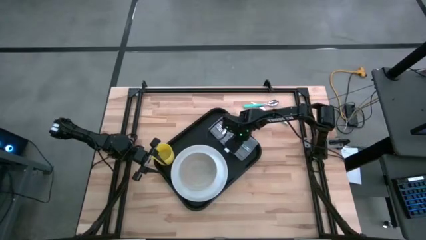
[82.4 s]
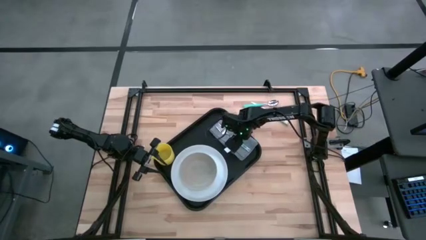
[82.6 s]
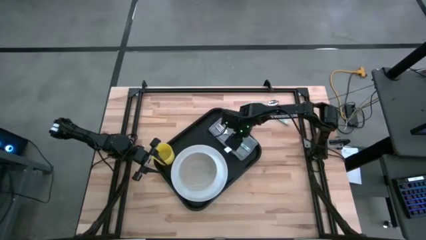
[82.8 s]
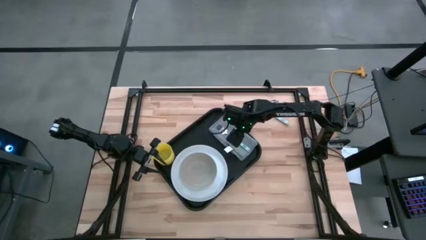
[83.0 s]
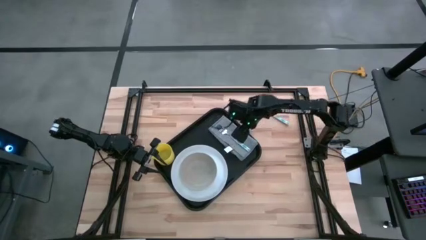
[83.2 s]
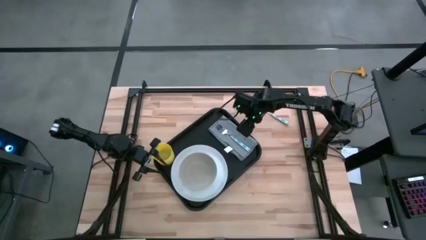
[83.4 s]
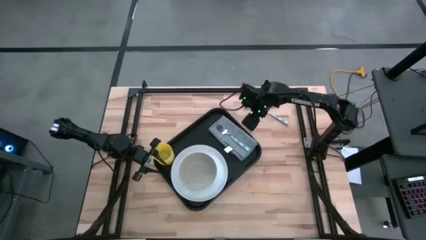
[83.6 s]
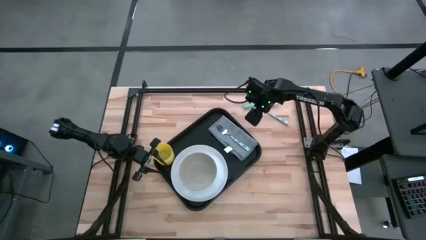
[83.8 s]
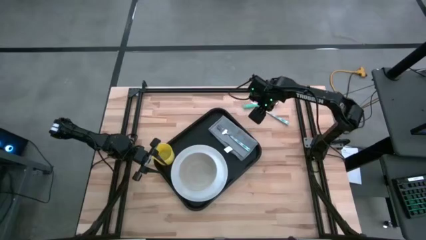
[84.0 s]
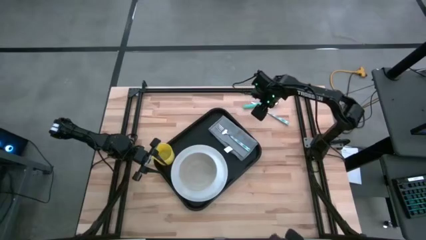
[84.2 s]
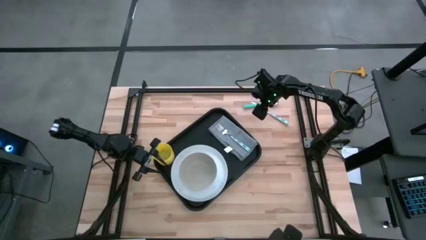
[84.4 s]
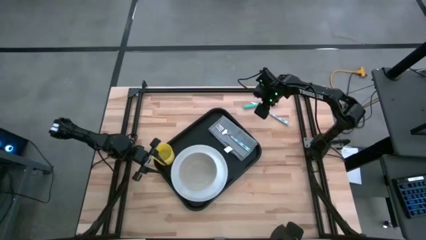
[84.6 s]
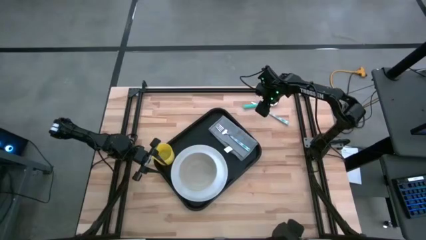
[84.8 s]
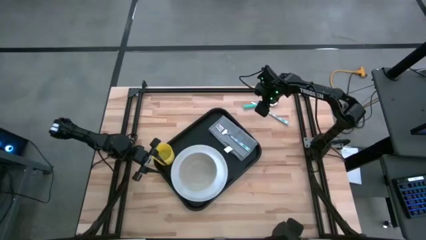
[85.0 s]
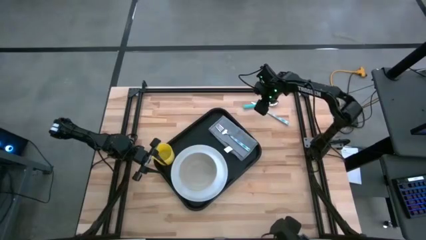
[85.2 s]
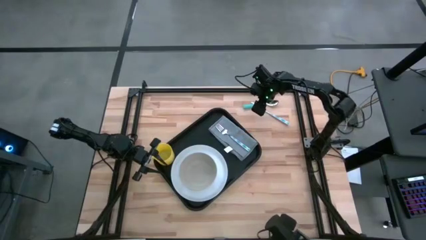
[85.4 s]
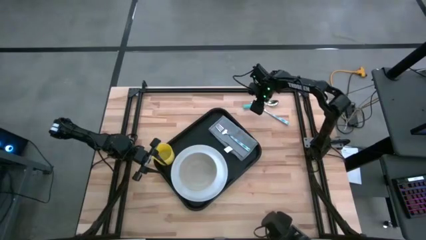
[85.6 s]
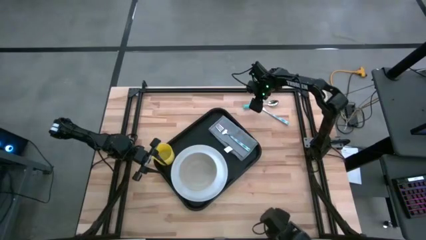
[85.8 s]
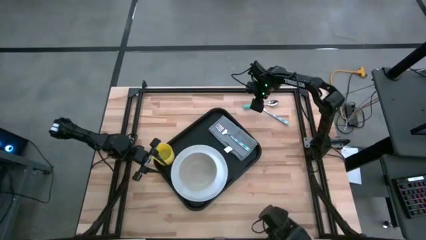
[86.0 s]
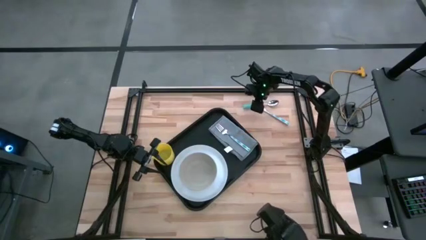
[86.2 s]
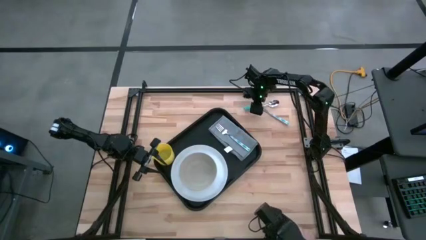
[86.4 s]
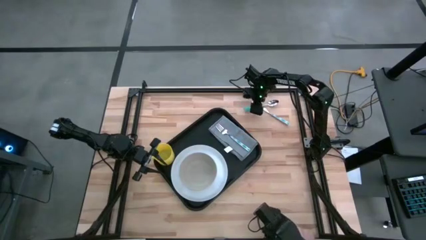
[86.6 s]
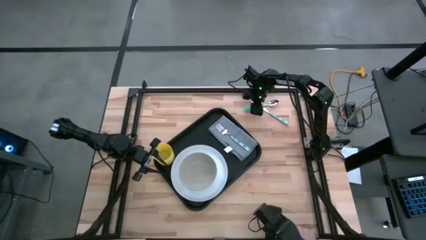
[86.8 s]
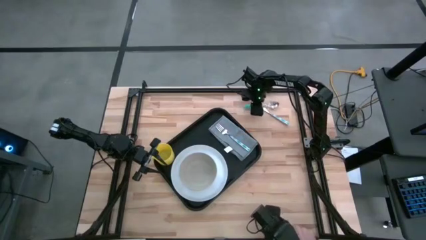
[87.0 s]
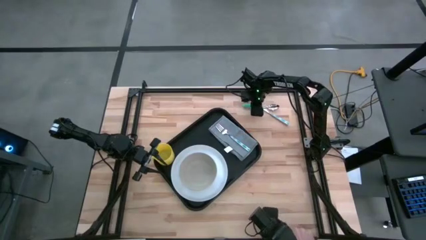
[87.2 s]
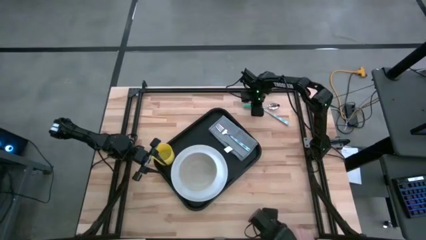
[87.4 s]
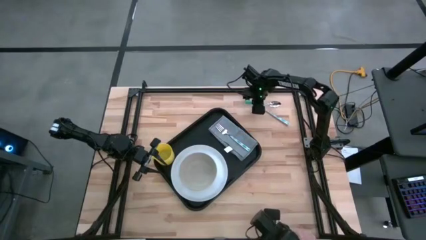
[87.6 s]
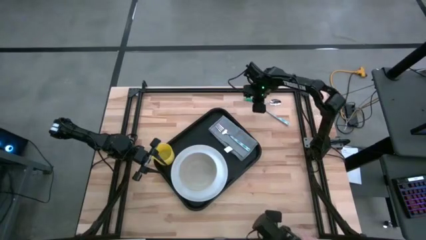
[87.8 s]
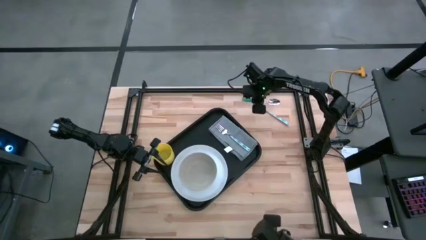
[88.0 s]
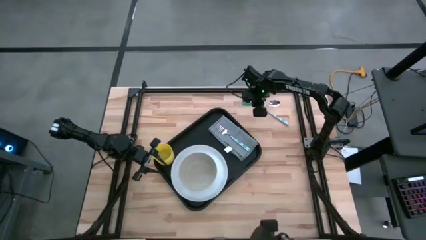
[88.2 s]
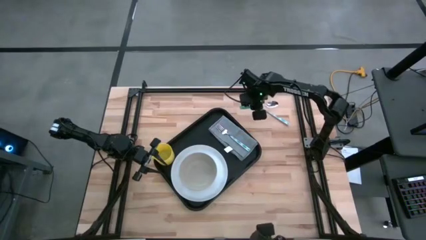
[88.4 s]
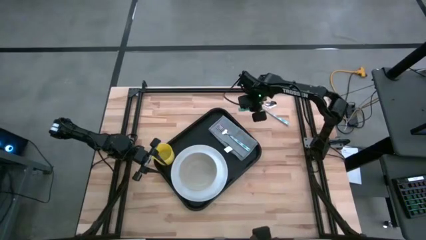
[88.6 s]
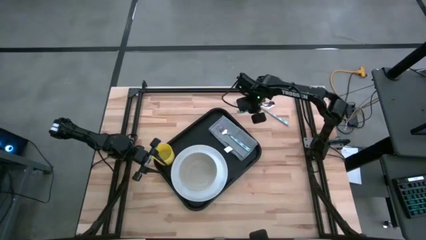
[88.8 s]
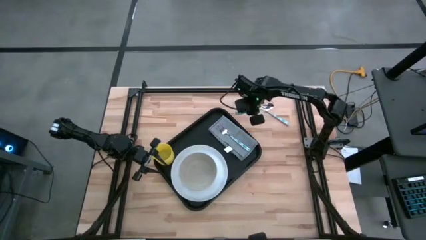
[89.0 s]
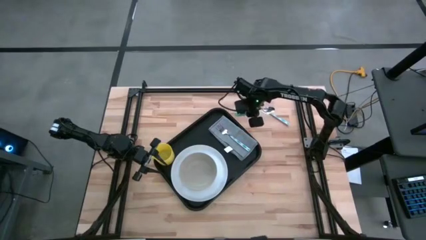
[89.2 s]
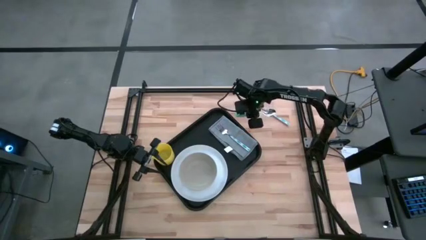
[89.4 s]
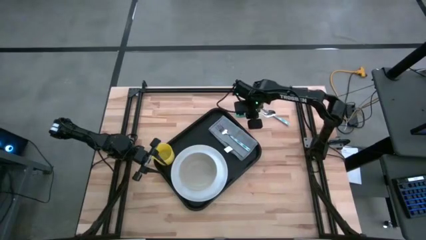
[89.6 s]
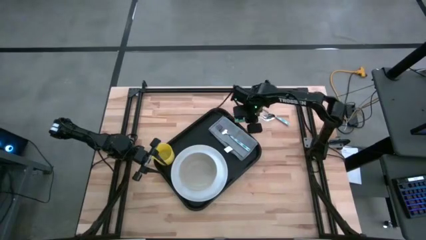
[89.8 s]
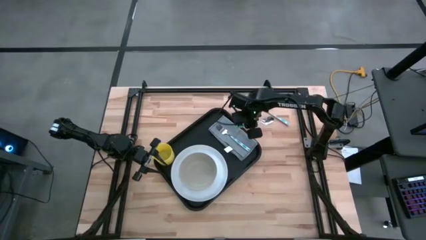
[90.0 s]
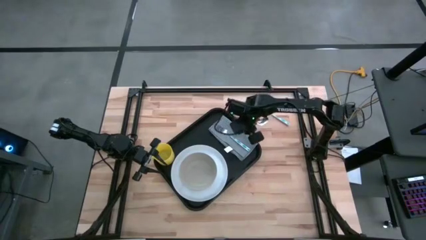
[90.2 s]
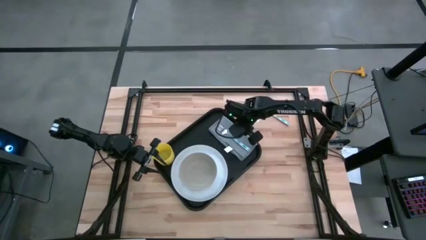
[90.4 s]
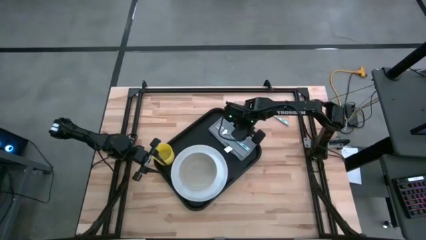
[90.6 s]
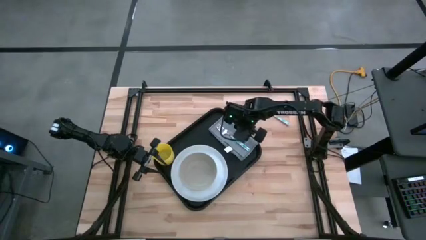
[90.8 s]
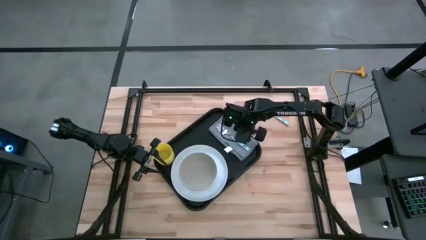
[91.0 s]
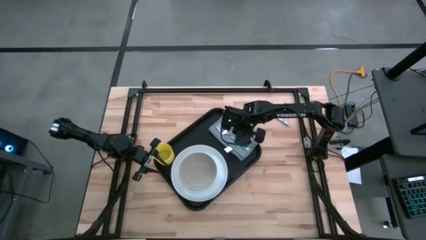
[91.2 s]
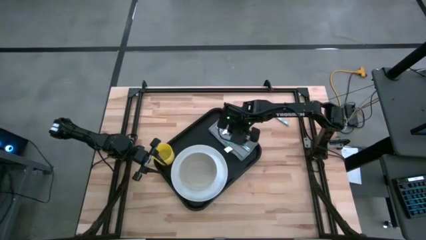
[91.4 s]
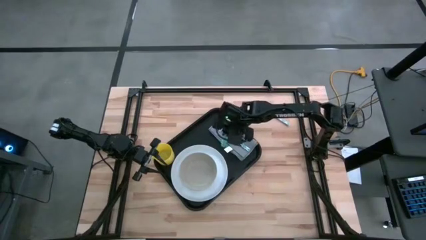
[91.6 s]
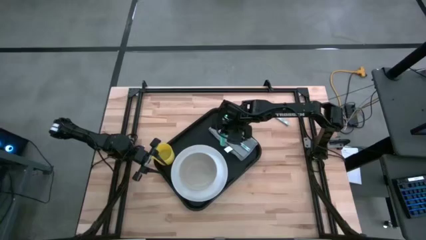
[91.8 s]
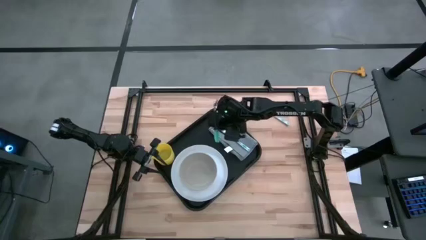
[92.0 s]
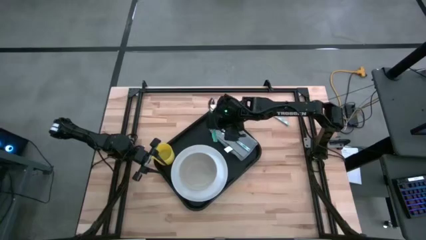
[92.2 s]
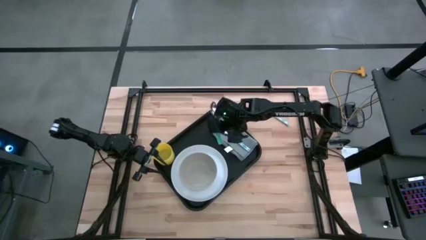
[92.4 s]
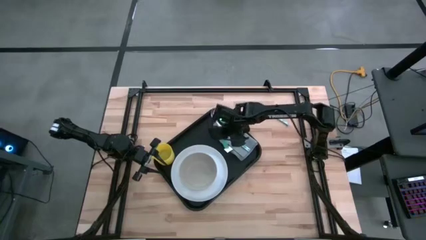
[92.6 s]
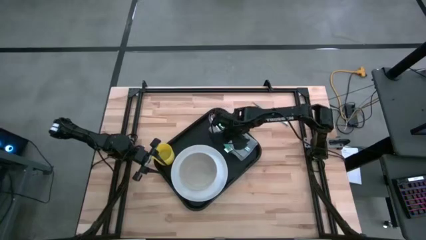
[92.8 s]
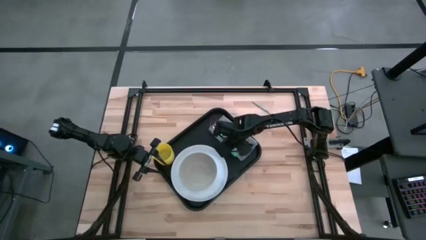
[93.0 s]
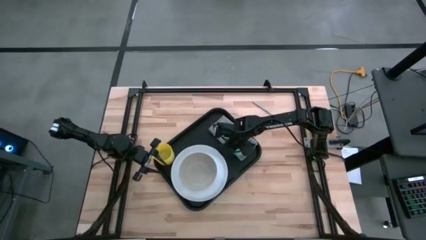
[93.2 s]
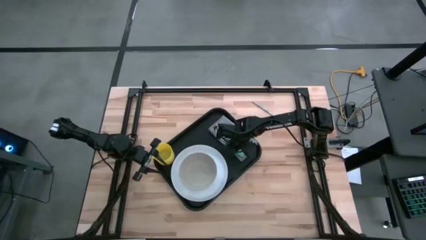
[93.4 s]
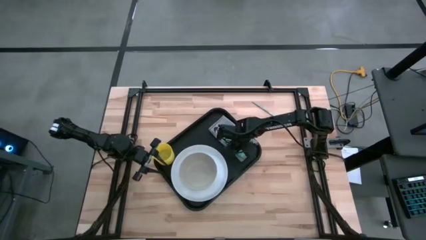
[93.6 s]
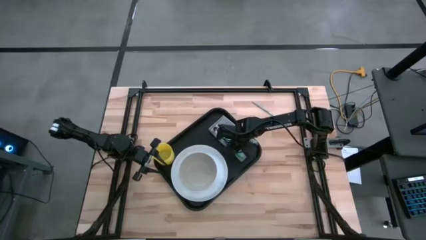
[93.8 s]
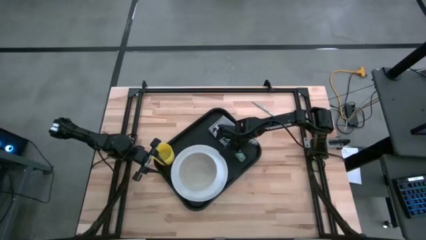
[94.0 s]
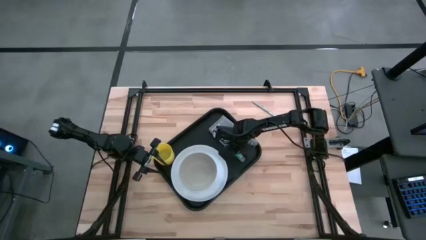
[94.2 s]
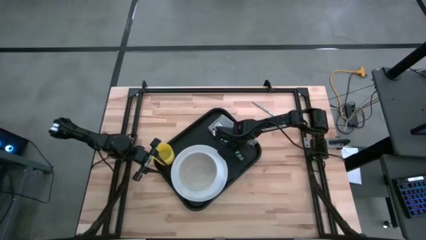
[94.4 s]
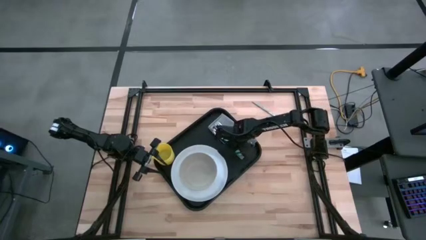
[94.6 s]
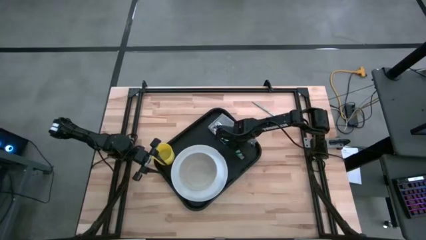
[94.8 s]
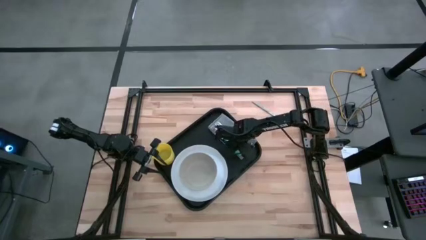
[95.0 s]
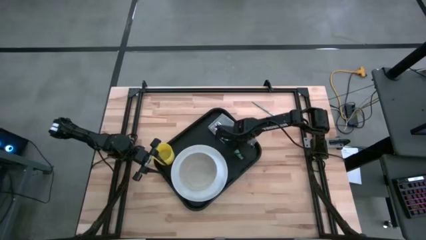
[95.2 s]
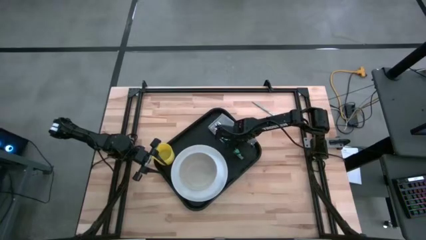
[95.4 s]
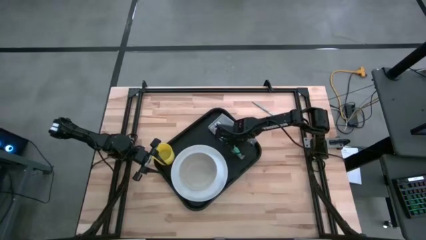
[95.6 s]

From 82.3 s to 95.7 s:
Task: Set up tray
Put the green spoon on top of the gray napkin on the black tray to the left of the blue patterned fork

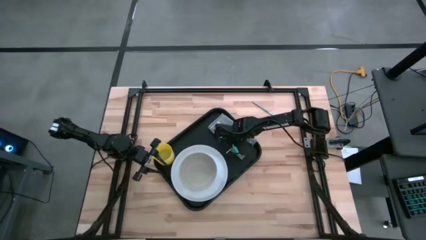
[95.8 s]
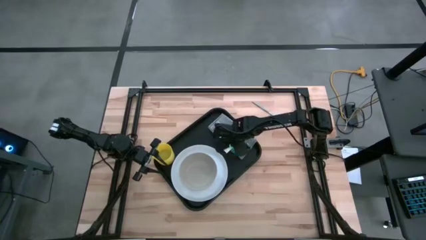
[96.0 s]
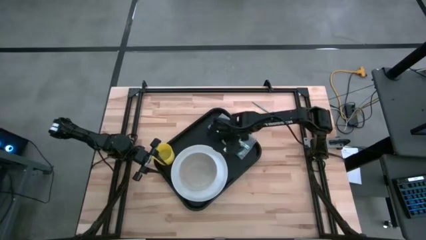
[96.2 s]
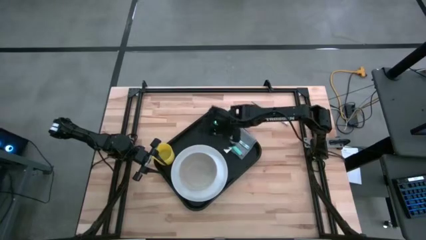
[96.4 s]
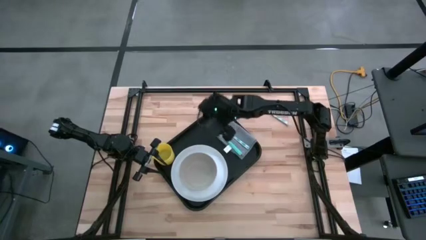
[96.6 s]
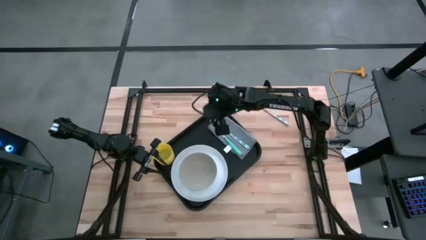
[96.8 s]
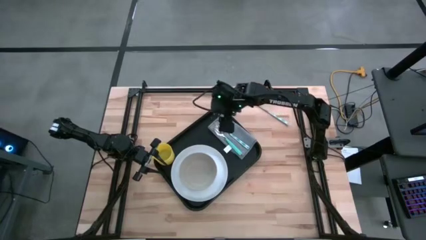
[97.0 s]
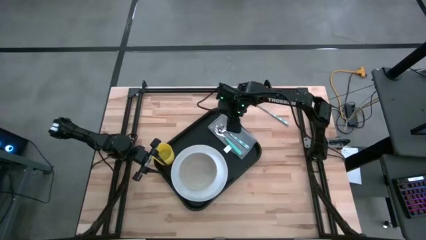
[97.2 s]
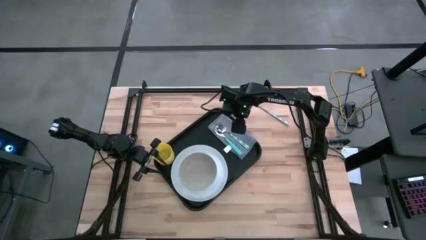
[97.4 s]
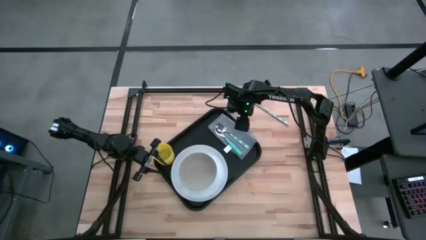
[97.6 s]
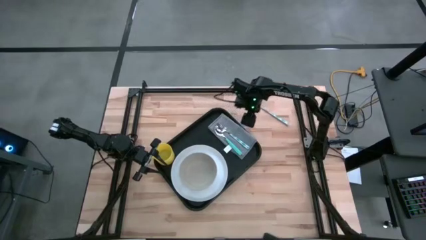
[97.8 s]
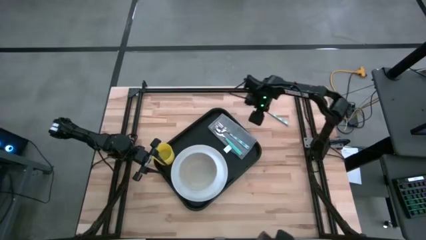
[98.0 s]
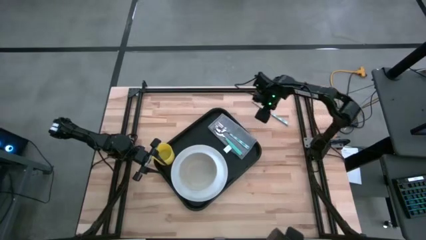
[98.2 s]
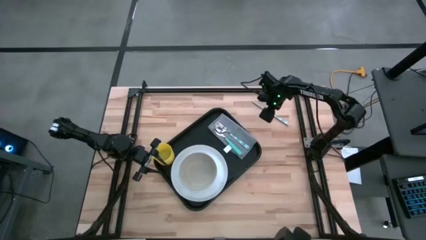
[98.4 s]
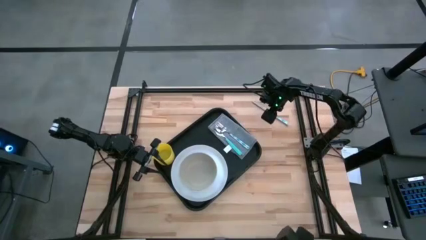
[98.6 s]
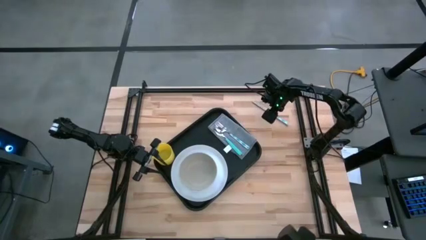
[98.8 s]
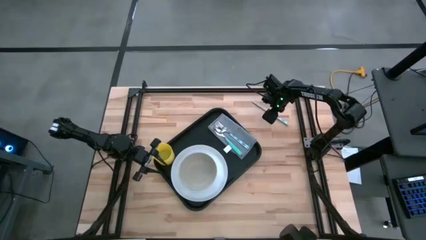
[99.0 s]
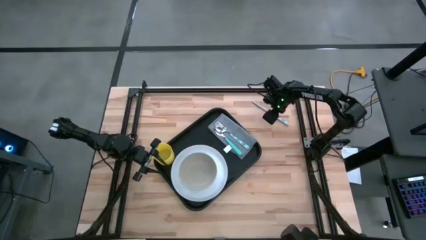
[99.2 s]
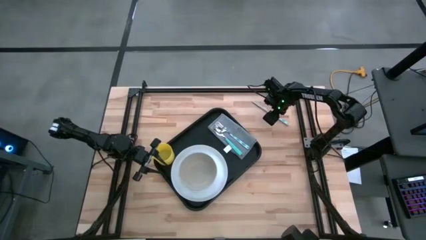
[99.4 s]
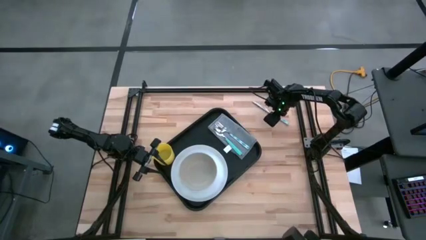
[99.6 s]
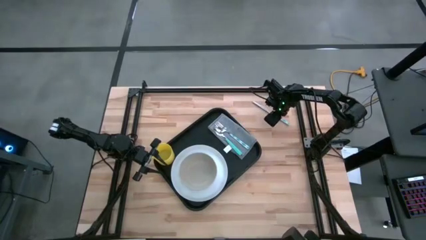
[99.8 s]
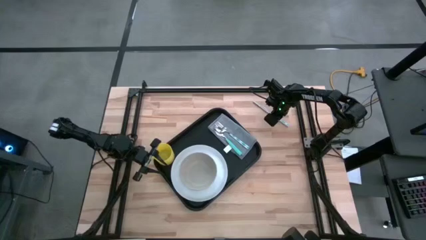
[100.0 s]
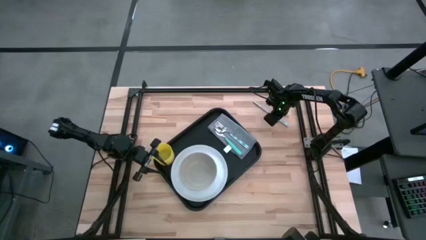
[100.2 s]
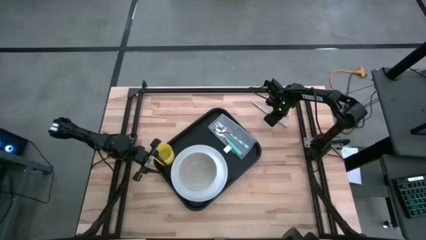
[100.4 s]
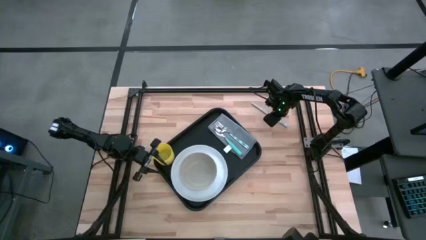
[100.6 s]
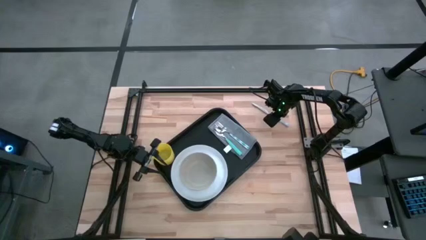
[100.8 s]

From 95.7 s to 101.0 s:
Put the blue patterned knife on top of the gray napkin on the black tray to the right of the blue patterned fork
